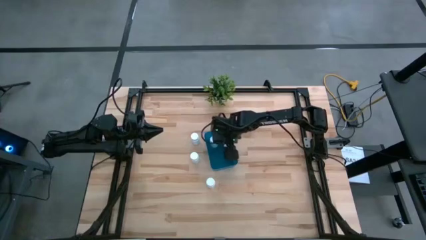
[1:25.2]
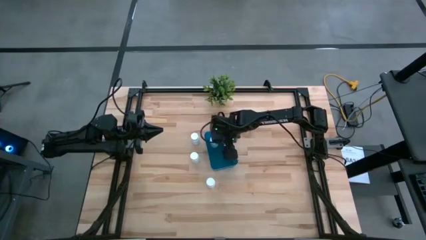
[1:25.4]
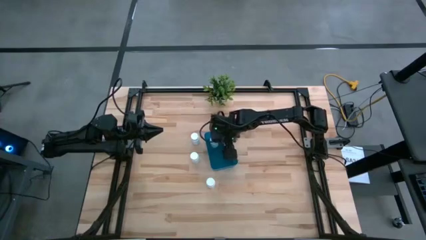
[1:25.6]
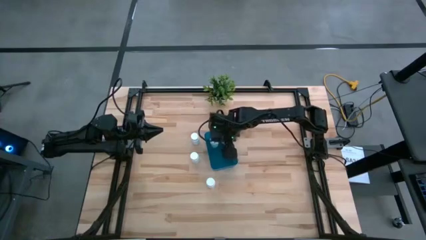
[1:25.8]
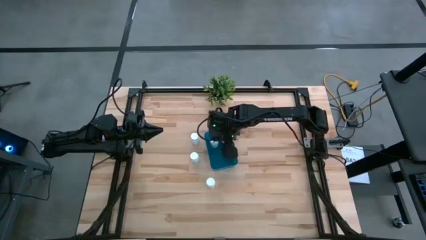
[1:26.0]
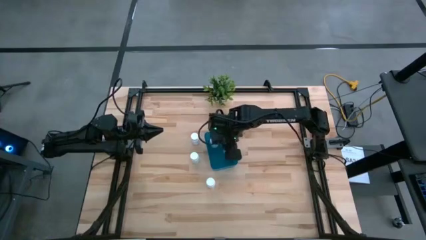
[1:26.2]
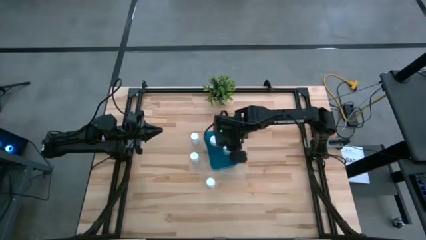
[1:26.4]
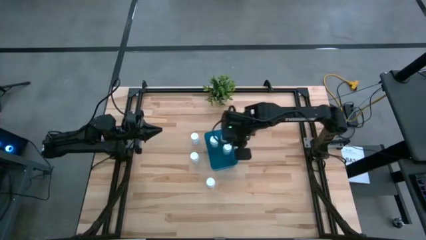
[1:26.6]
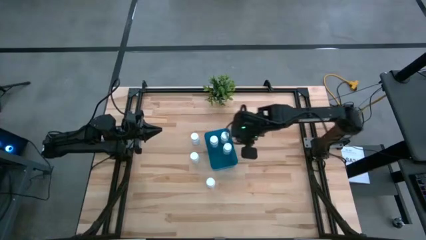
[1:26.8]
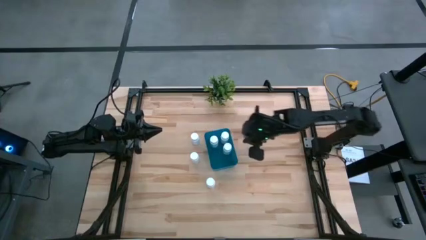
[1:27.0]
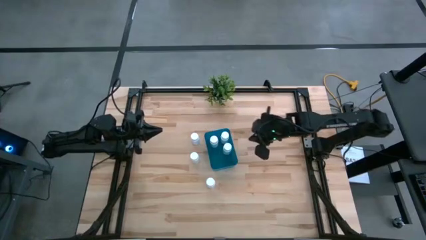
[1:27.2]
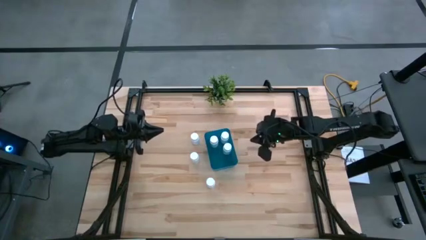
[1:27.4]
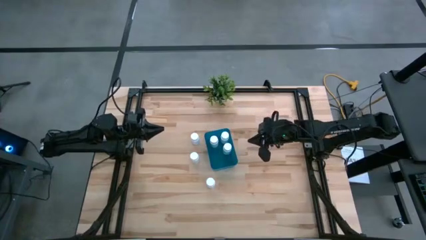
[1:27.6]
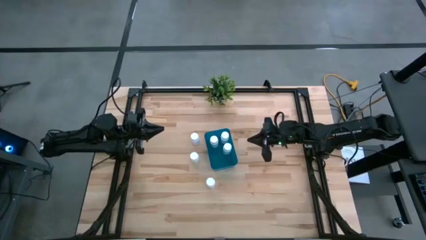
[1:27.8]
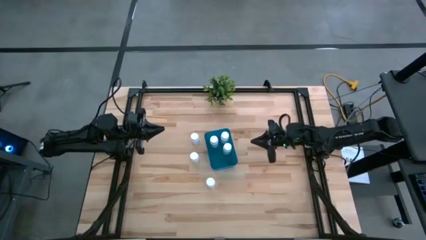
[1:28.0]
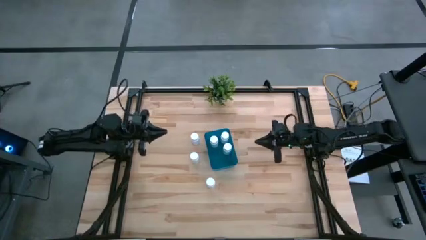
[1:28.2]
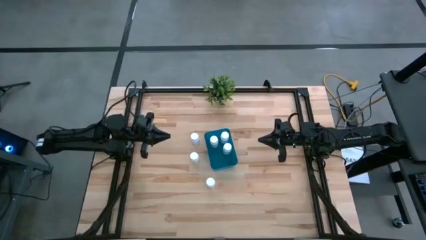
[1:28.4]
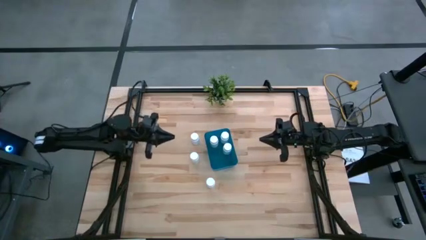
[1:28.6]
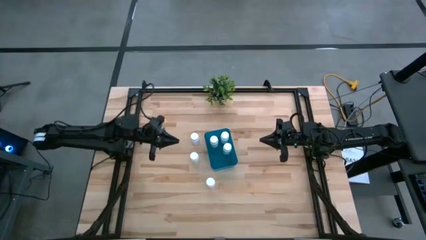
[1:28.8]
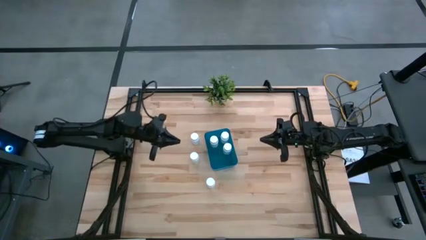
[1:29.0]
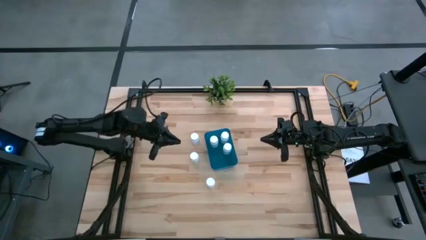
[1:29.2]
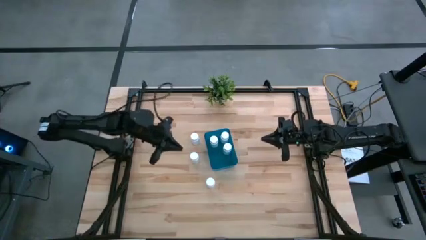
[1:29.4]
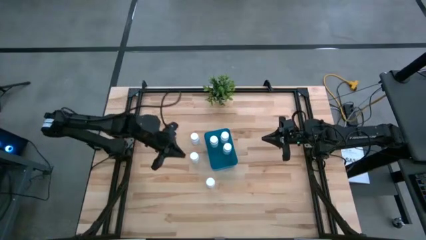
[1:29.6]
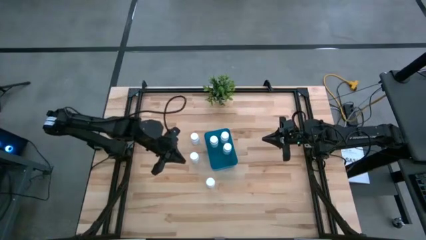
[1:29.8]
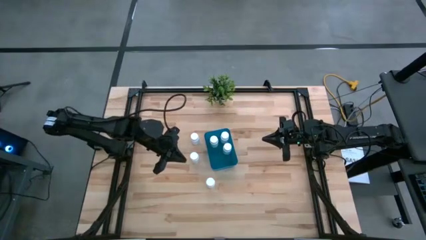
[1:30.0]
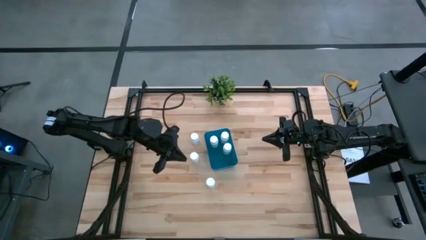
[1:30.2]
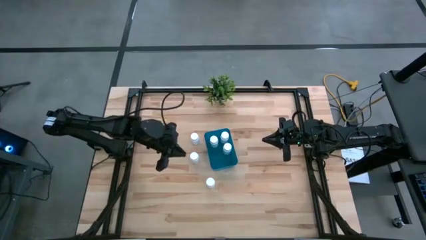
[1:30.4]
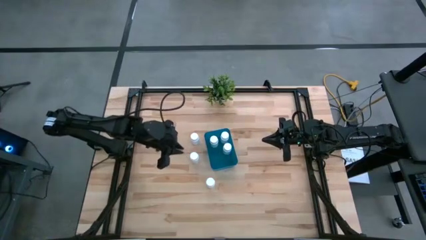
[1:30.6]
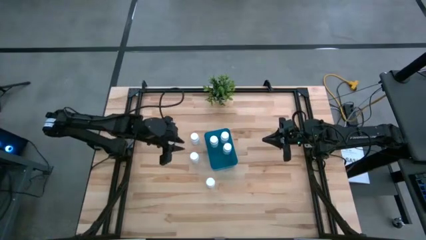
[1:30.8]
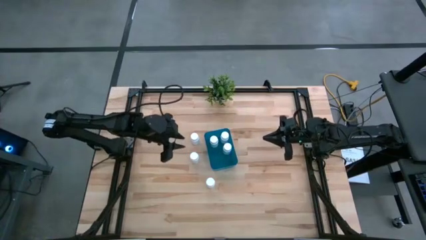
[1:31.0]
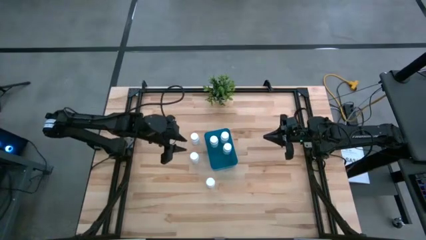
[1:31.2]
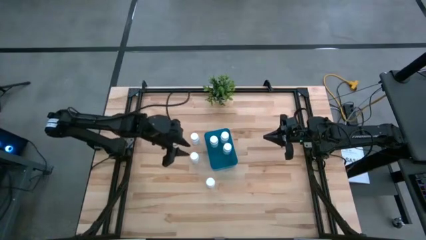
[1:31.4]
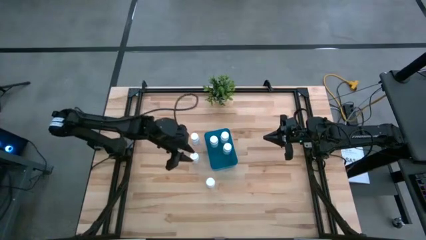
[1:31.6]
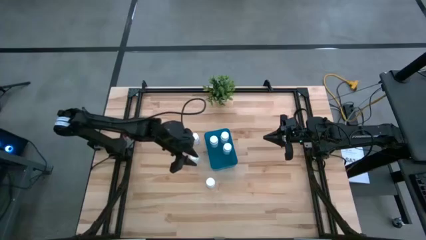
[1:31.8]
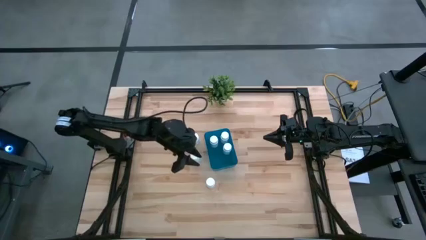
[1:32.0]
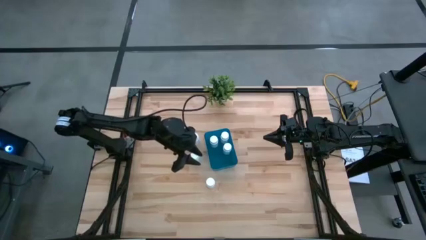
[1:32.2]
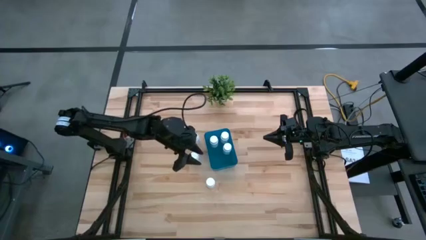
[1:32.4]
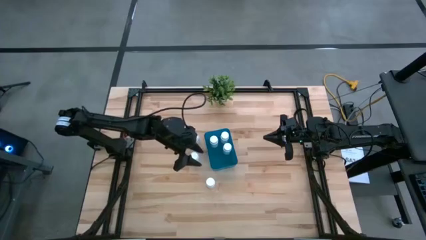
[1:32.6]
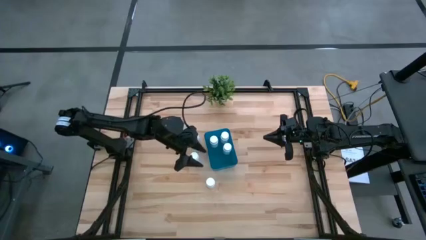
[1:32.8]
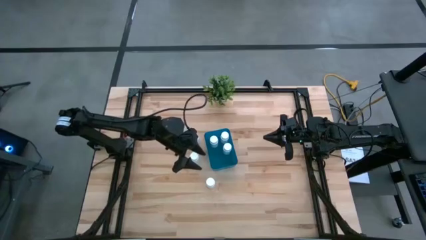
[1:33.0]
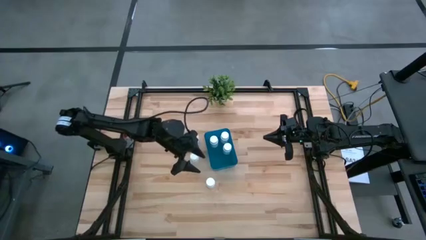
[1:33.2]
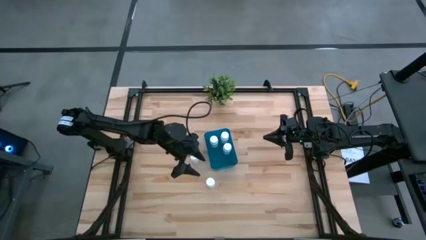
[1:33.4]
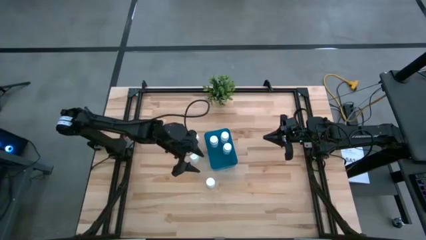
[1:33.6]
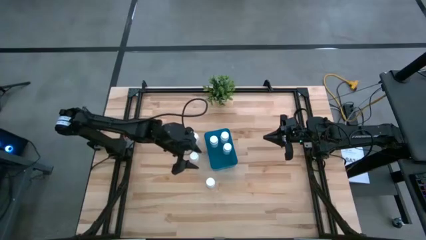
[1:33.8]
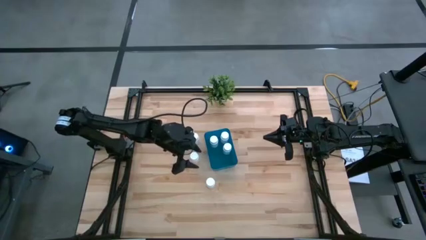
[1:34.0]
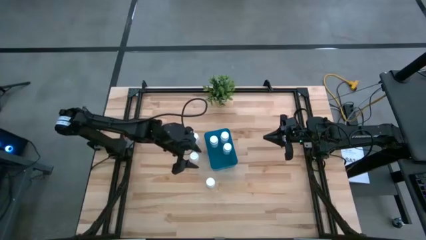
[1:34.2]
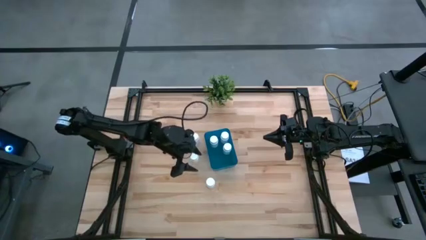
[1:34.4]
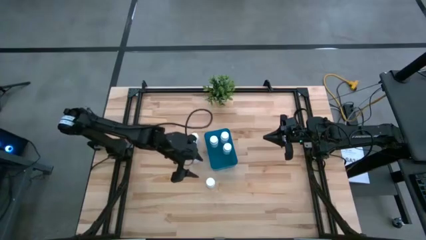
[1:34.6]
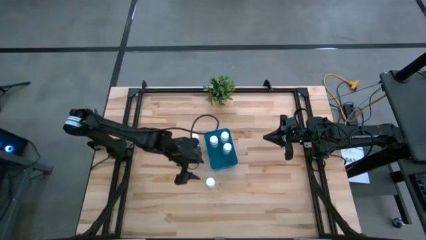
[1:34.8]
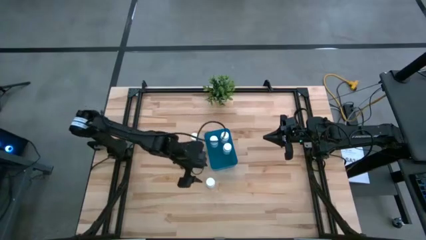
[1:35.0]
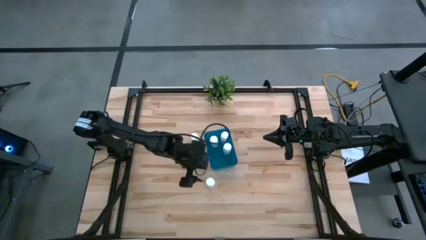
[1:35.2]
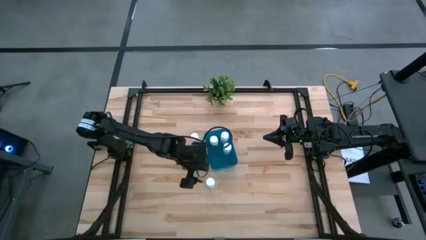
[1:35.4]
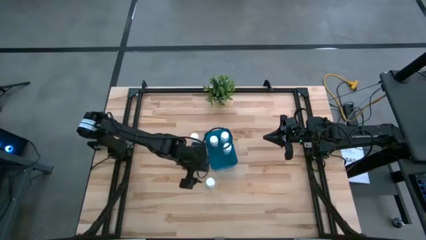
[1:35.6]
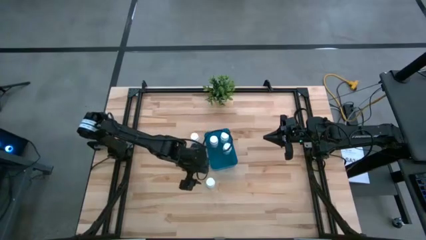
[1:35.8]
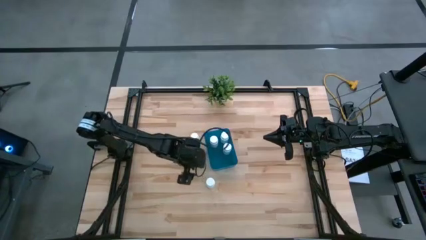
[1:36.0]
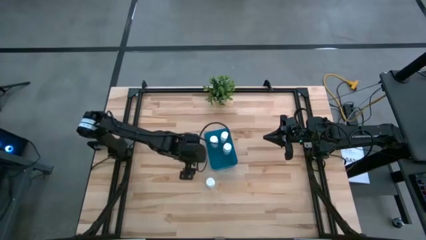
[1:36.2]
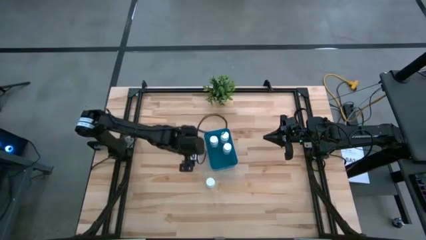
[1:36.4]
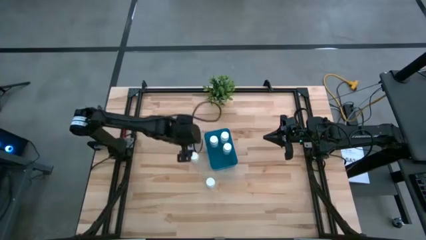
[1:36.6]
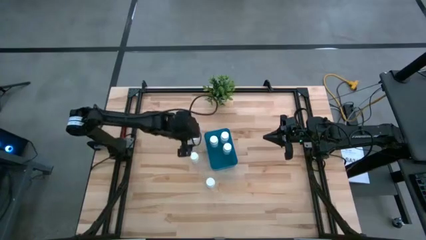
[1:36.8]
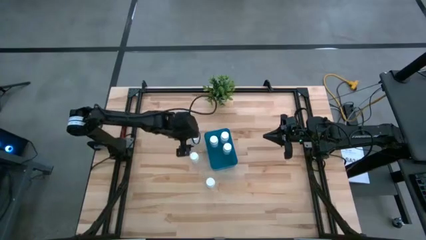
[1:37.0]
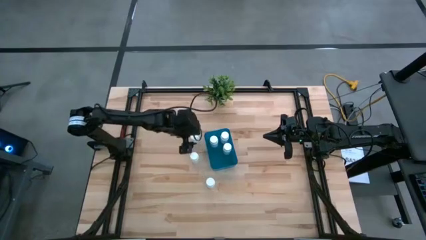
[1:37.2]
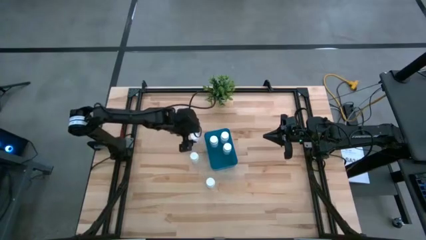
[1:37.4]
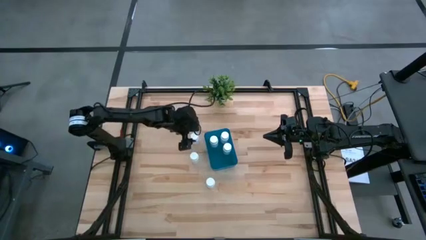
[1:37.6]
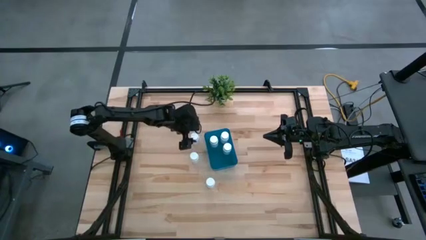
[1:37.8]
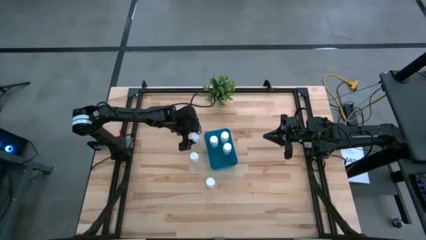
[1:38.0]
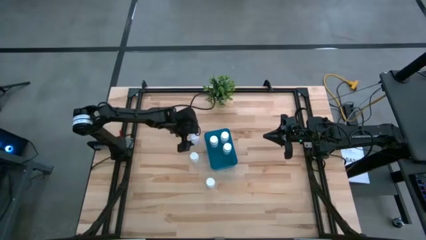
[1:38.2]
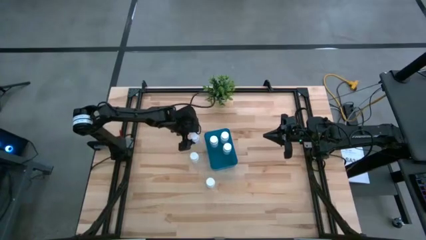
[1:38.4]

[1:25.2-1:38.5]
Task: Pick and place pill bottles into a basket
Put the top white medicine bottle into the blue bin
